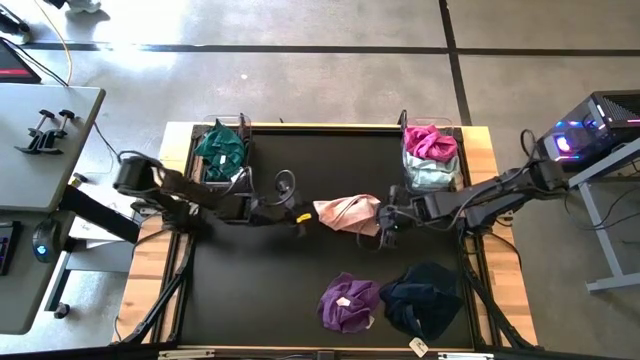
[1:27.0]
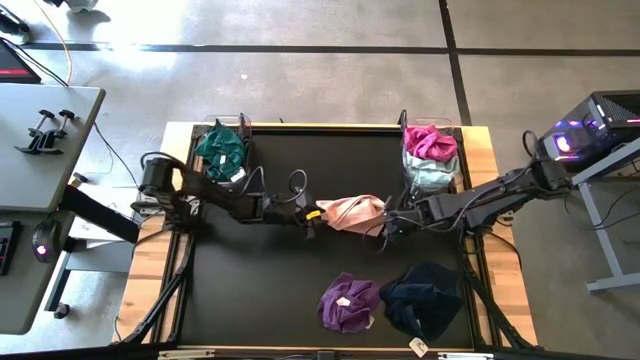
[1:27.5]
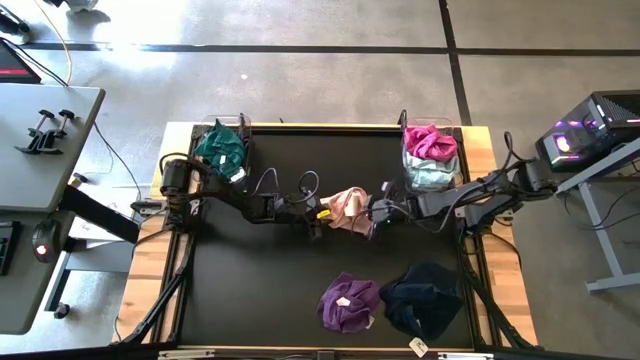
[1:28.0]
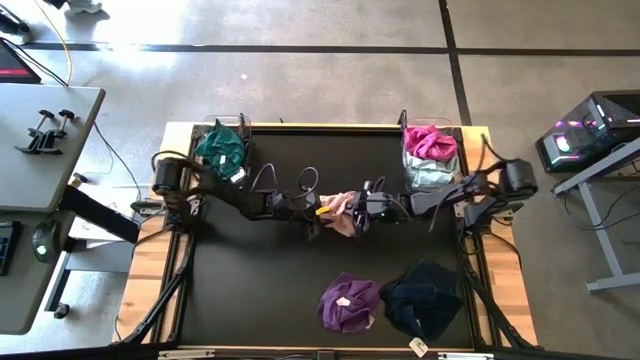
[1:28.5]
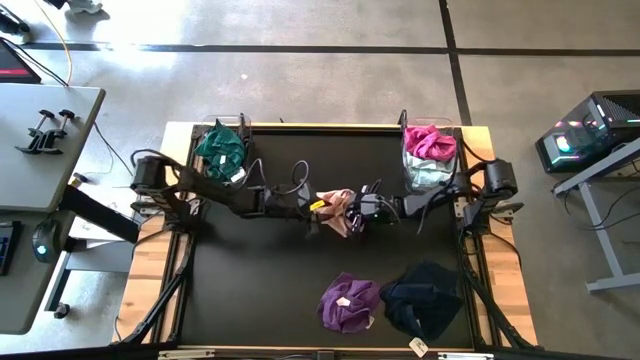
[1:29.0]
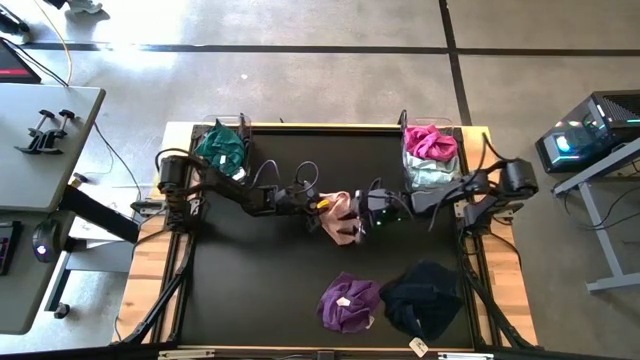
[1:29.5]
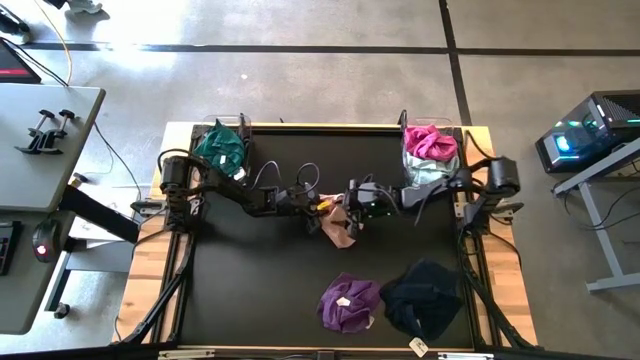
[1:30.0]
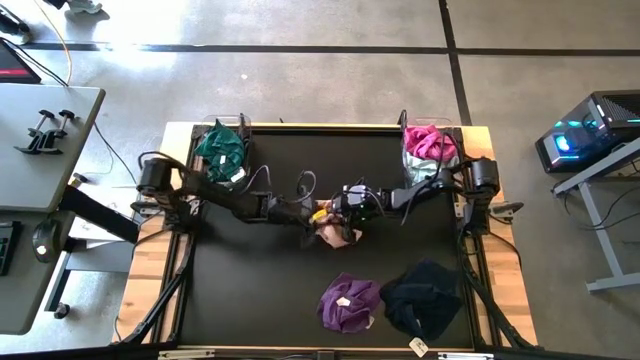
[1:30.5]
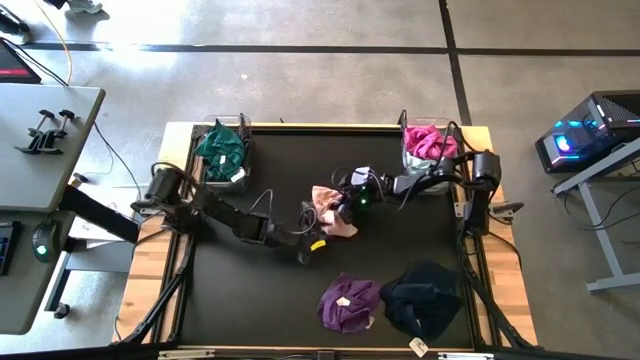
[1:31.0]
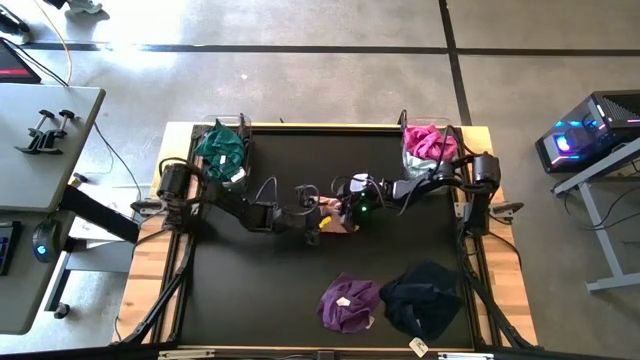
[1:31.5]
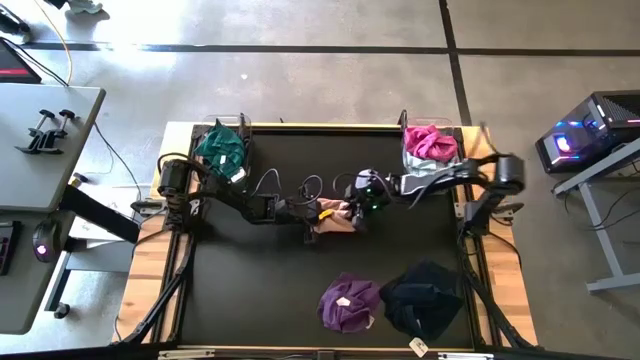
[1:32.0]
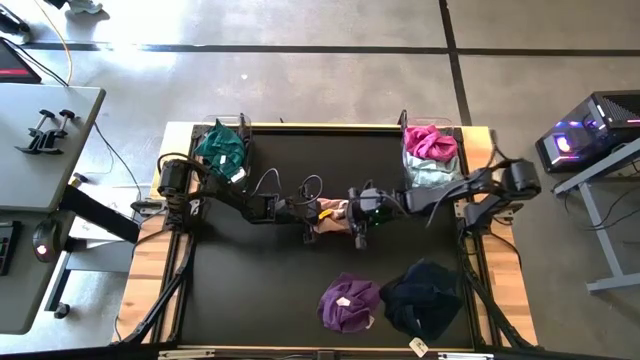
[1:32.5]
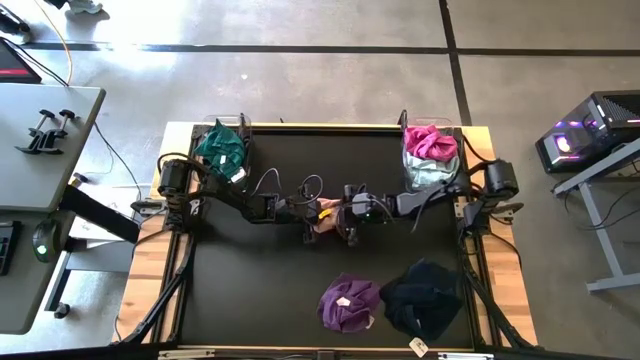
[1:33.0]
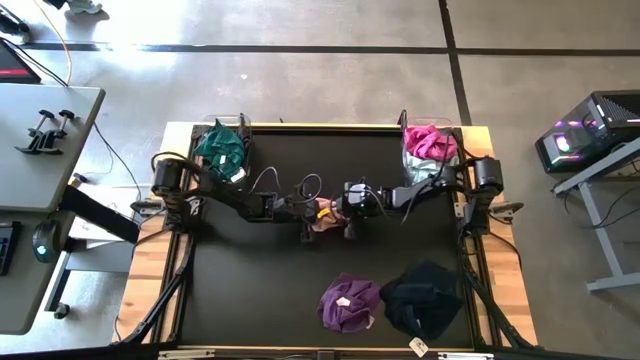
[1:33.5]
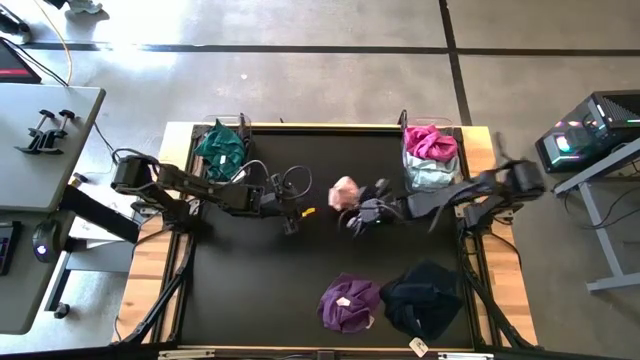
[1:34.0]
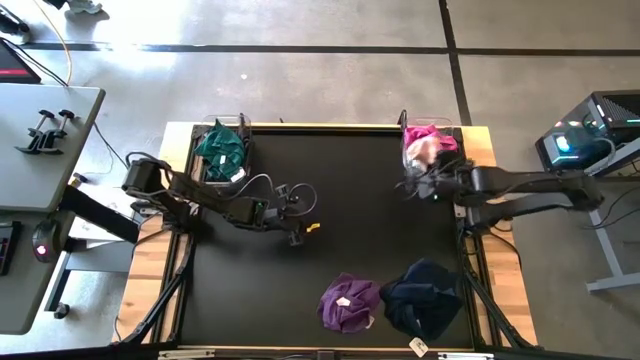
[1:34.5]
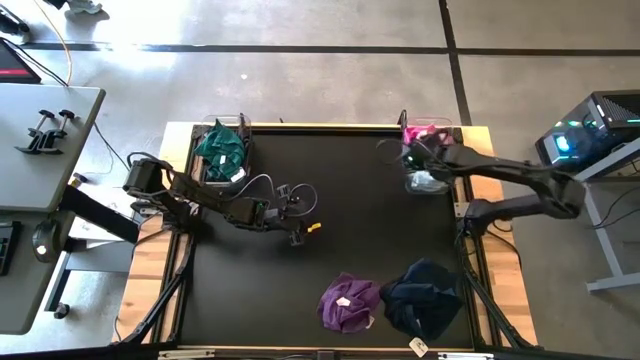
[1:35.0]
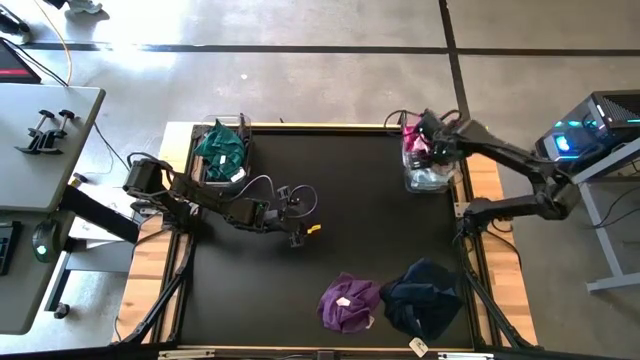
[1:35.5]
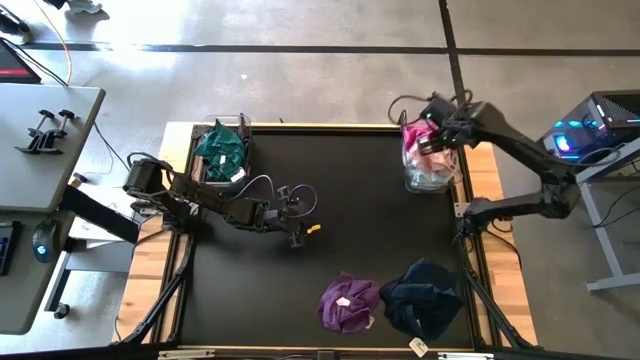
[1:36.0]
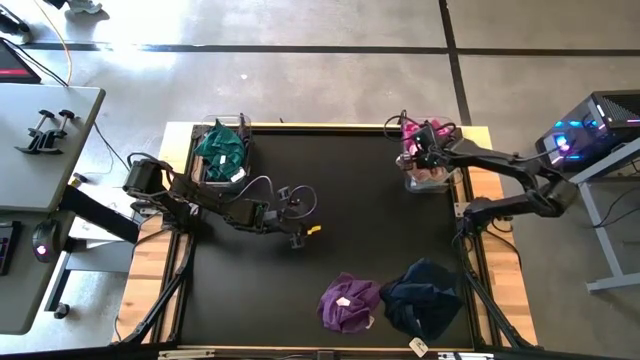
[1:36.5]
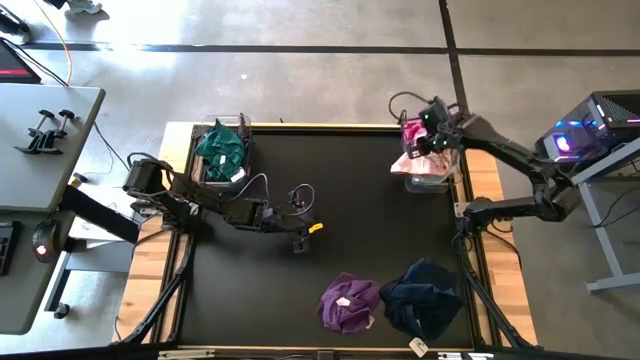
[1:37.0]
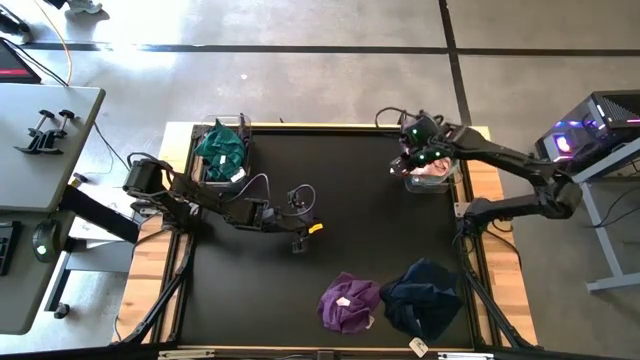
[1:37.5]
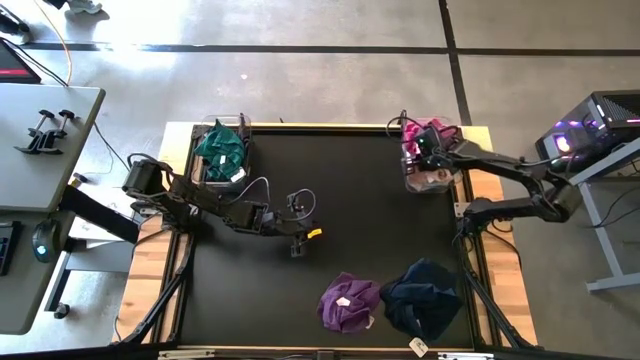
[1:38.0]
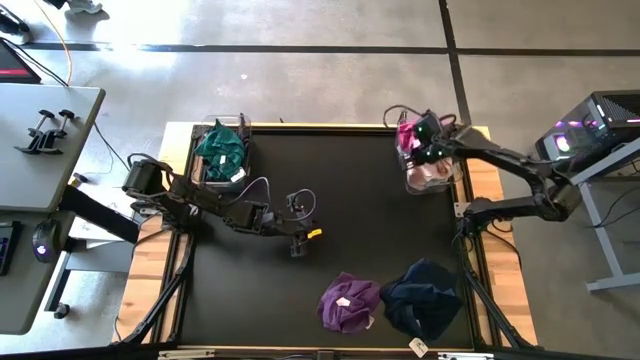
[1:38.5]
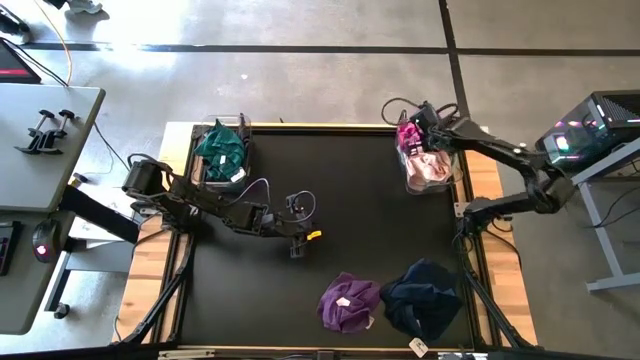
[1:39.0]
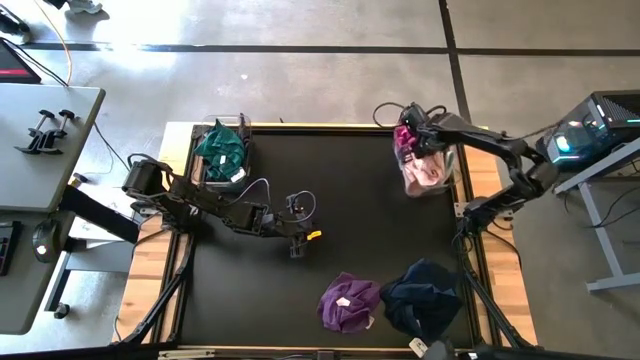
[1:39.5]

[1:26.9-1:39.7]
Task: Sort towels by color in basket
Put the orange microfiber cloth into the right transparent bin

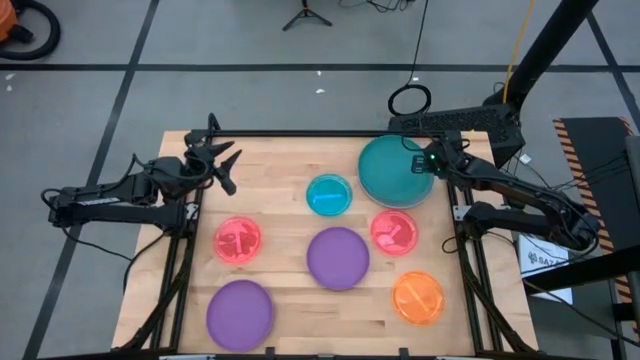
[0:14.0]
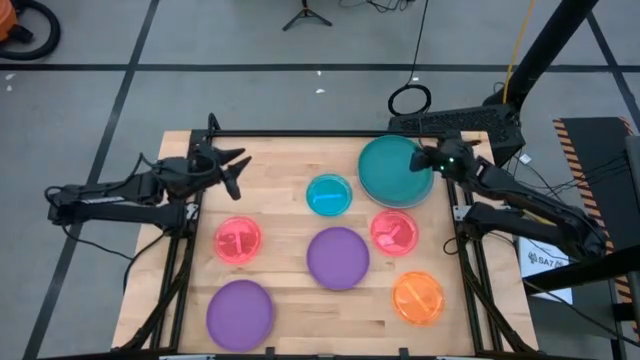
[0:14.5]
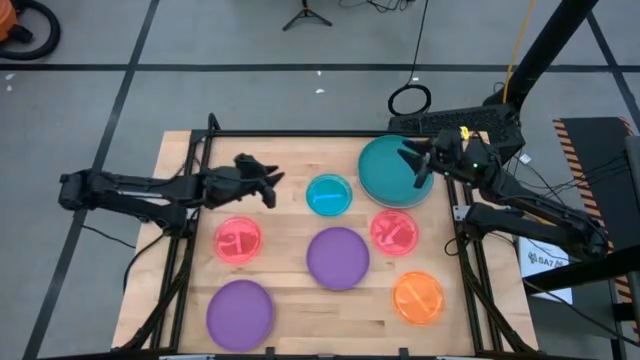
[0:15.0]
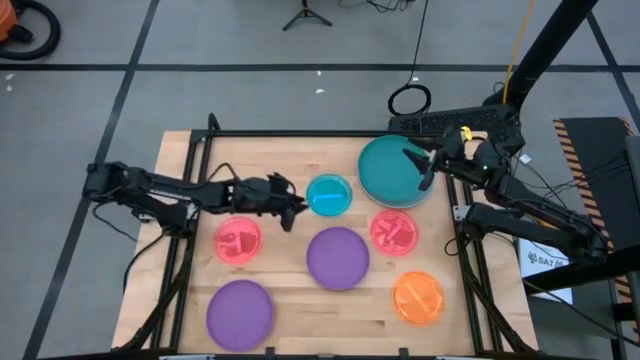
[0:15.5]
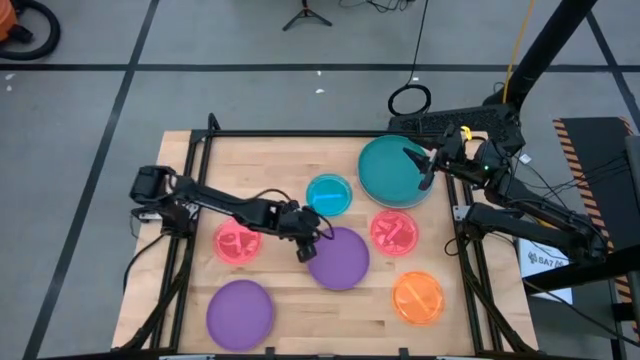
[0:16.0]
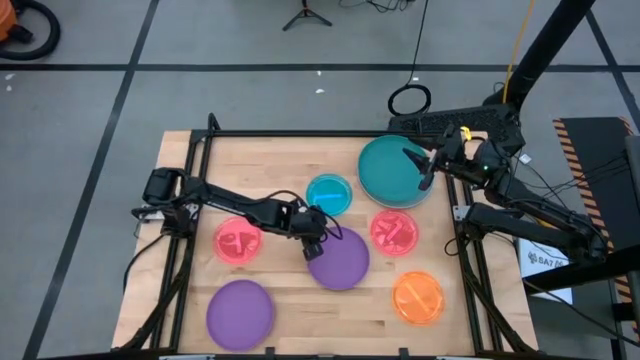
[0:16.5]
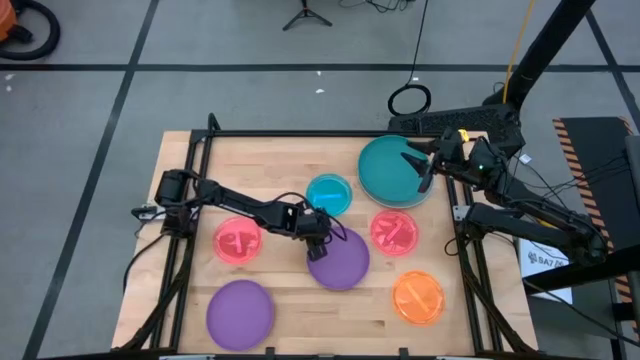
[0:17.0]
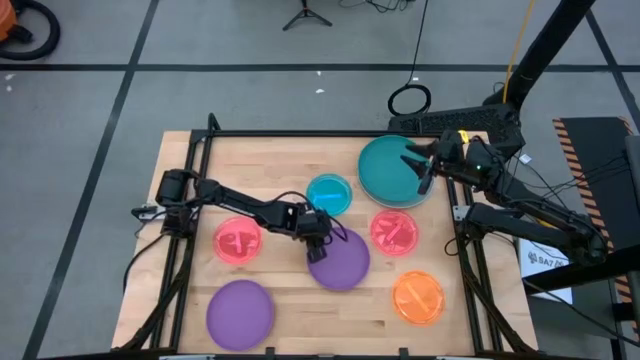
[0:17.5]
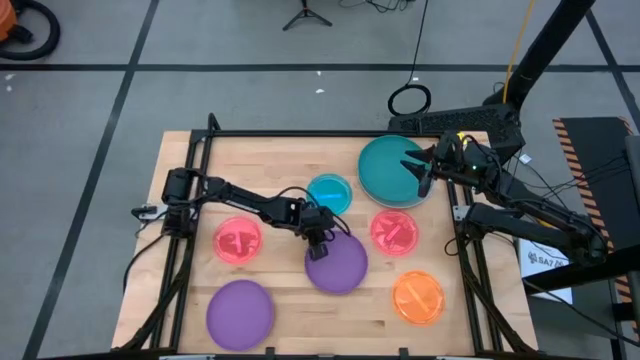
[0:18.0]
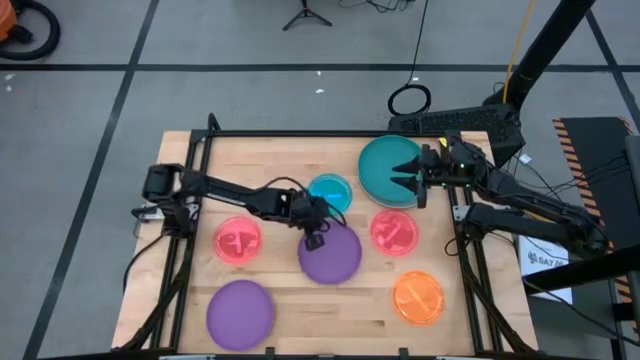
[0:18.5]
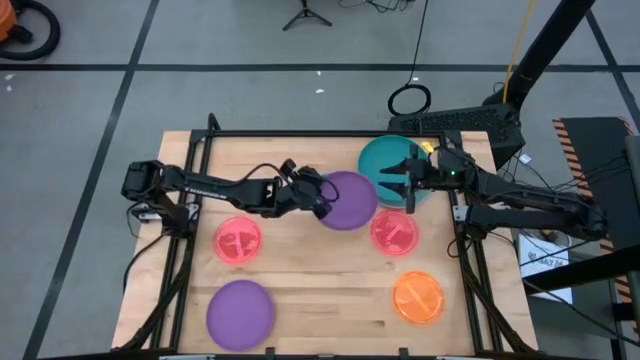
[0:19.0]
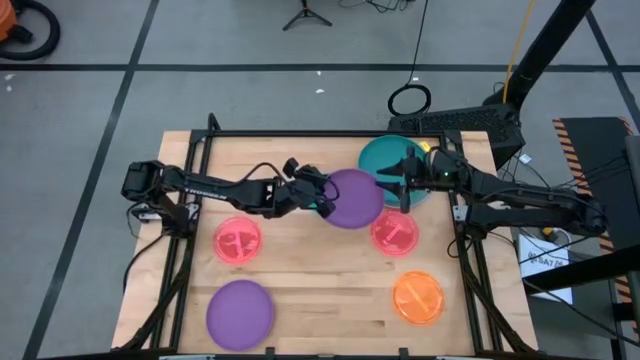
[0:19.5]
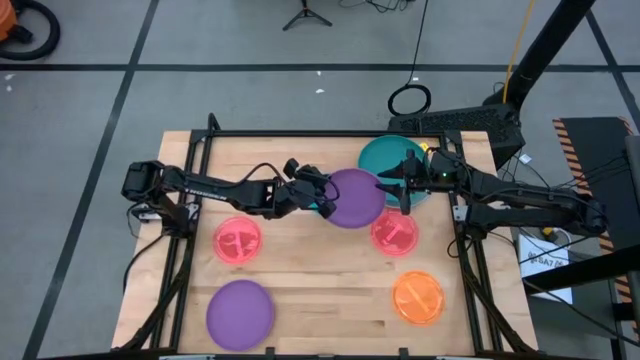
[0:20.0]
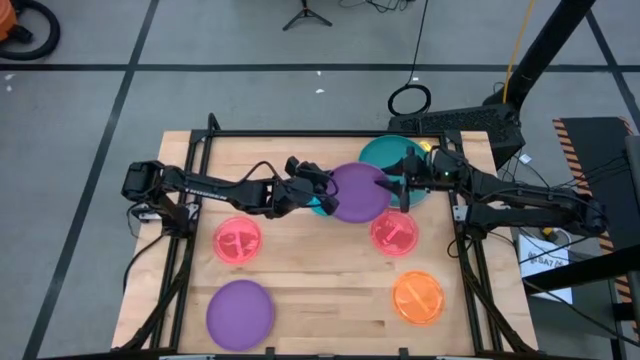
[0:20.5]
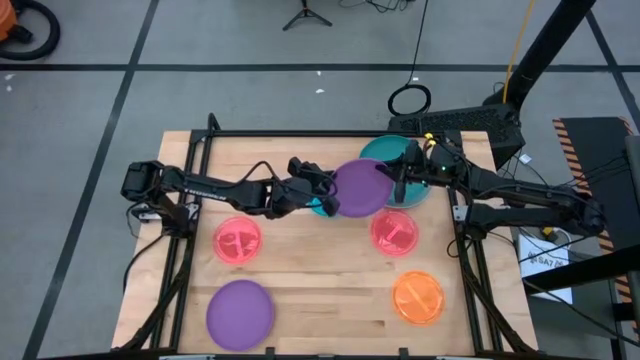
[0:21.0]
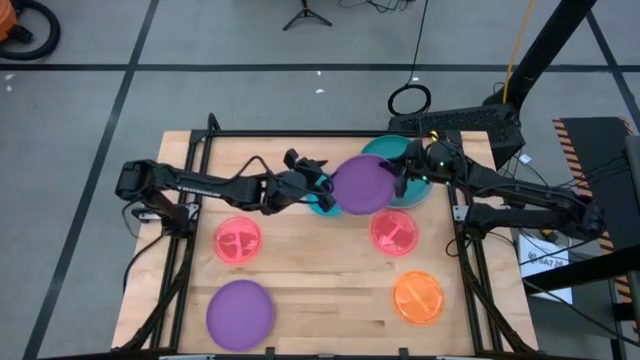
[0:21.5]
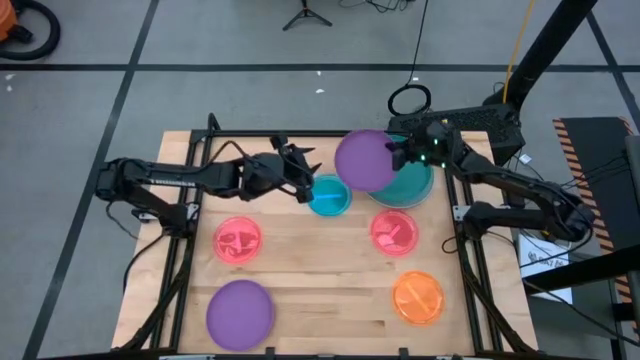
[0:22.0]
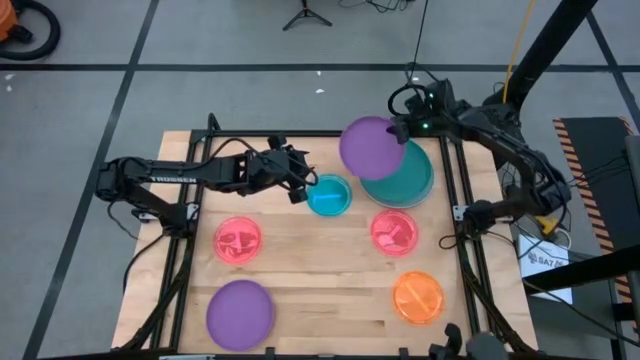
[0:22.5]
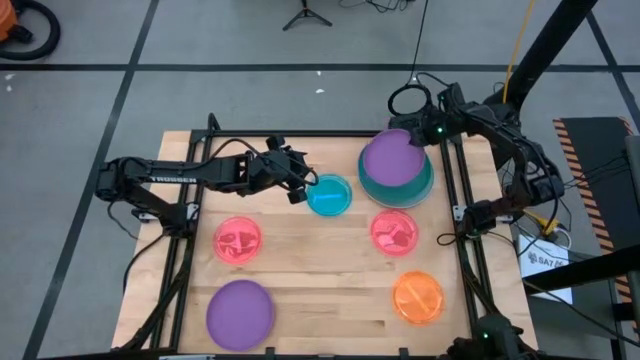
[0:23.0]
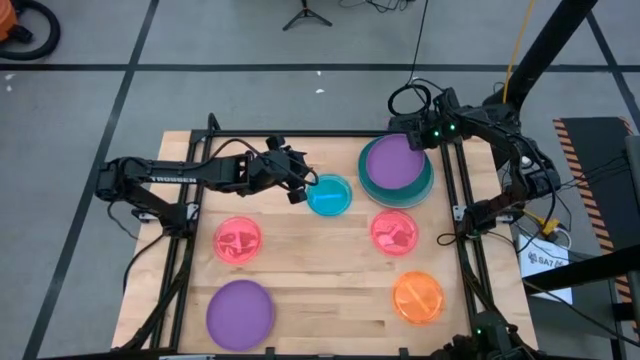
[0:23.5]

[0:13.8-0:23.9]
Task: Stack plastic plates
Stack the right purple plate on top of the green plate
